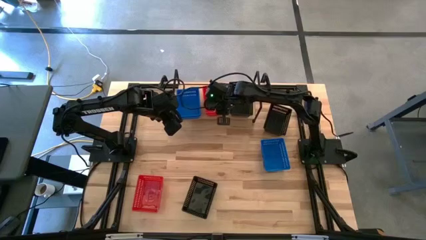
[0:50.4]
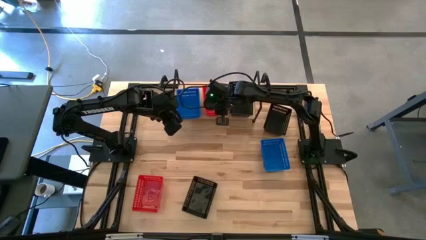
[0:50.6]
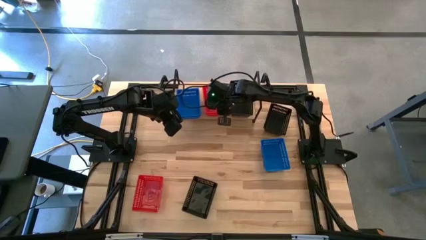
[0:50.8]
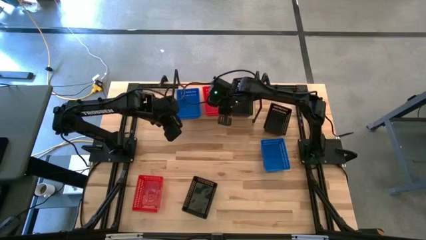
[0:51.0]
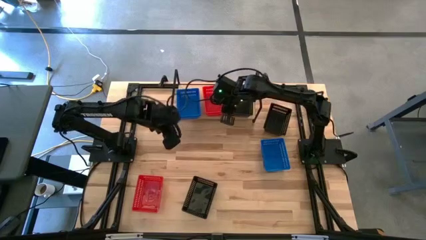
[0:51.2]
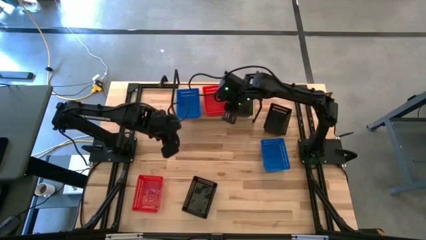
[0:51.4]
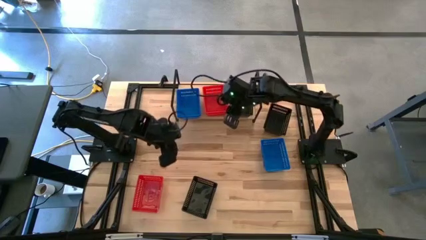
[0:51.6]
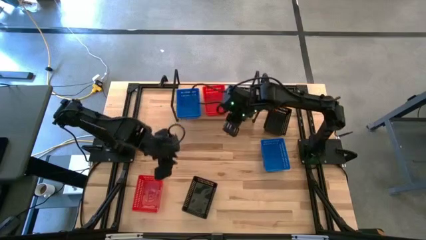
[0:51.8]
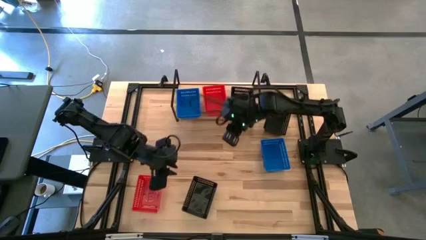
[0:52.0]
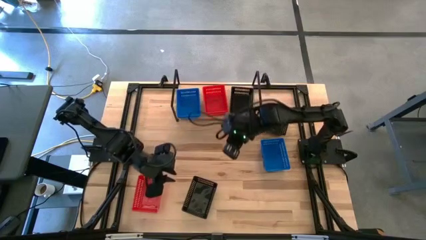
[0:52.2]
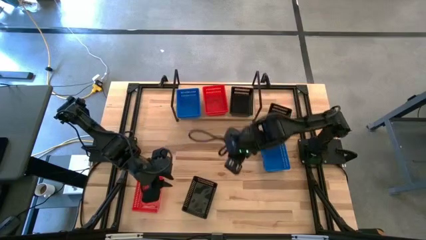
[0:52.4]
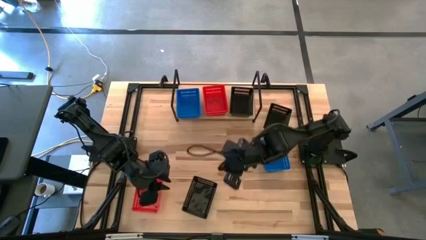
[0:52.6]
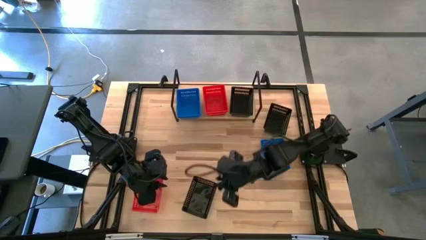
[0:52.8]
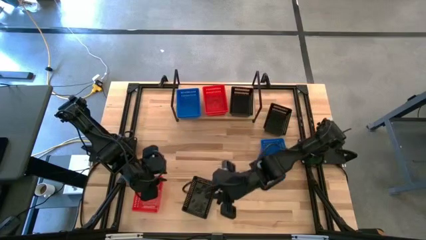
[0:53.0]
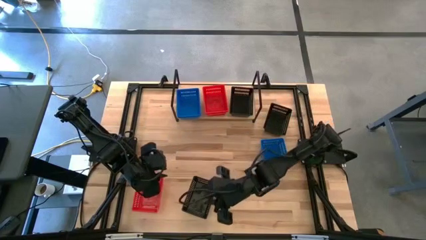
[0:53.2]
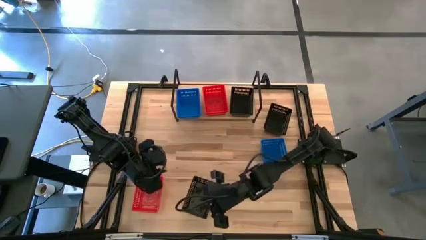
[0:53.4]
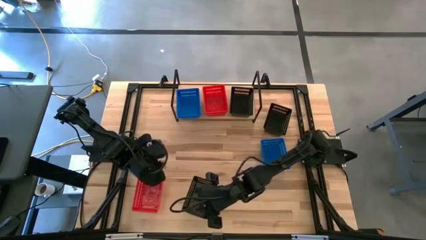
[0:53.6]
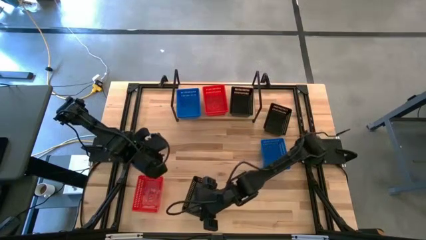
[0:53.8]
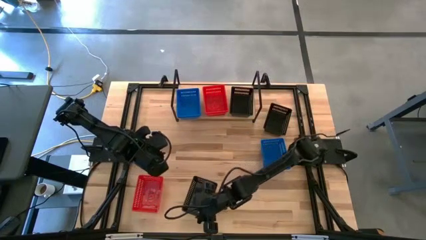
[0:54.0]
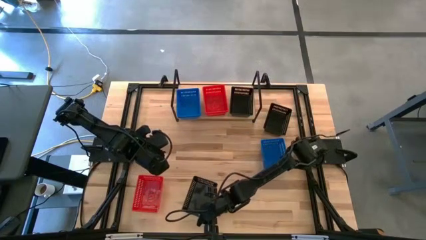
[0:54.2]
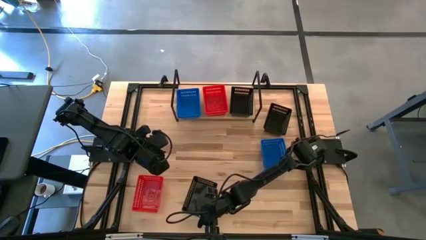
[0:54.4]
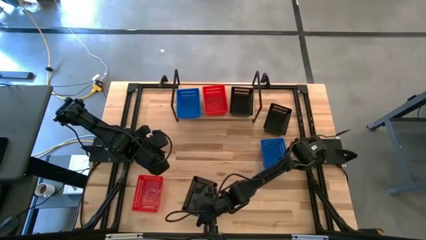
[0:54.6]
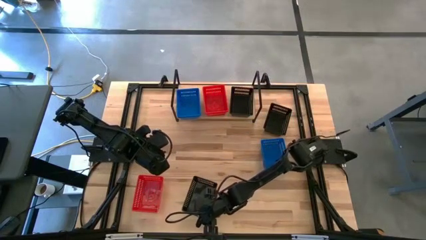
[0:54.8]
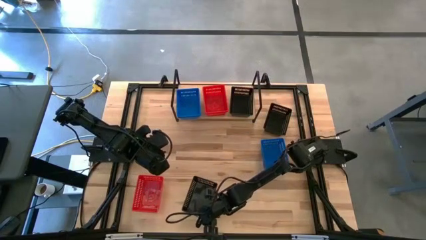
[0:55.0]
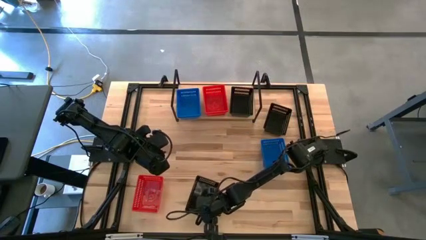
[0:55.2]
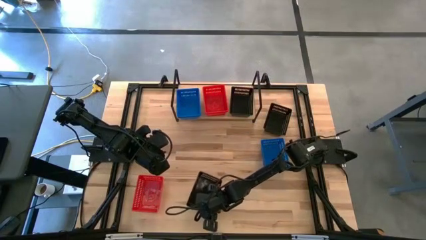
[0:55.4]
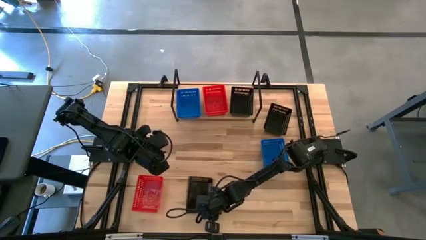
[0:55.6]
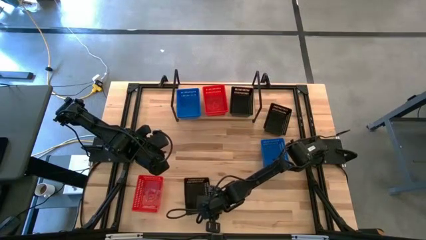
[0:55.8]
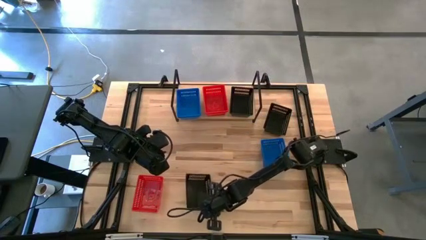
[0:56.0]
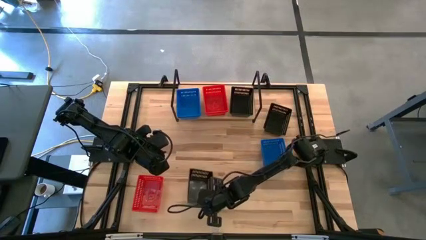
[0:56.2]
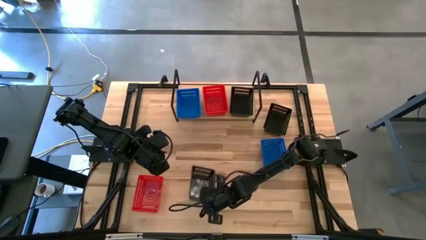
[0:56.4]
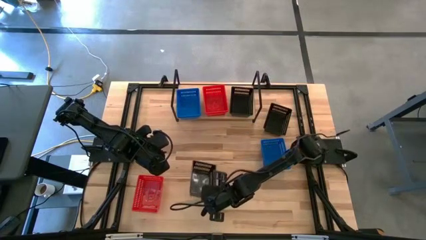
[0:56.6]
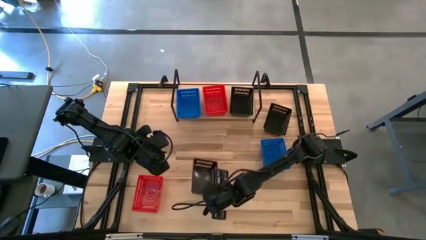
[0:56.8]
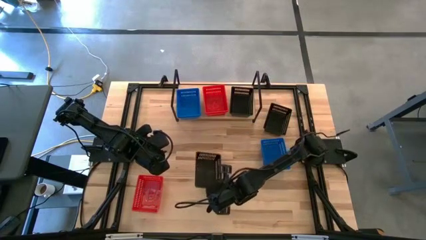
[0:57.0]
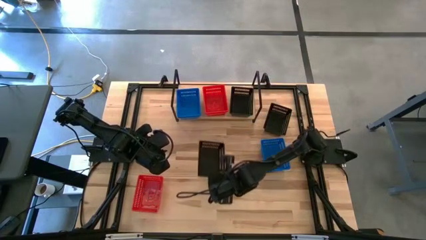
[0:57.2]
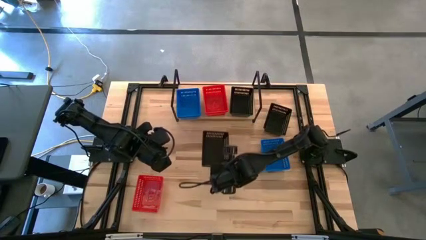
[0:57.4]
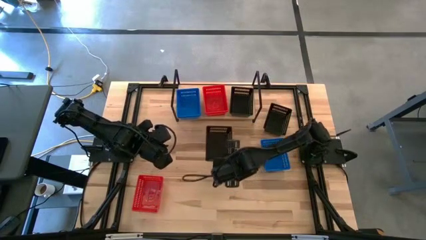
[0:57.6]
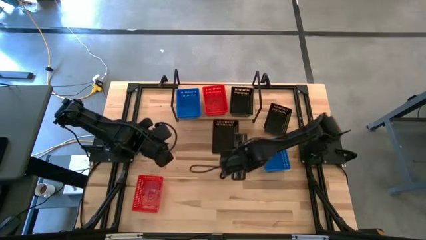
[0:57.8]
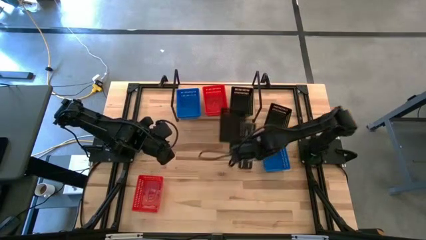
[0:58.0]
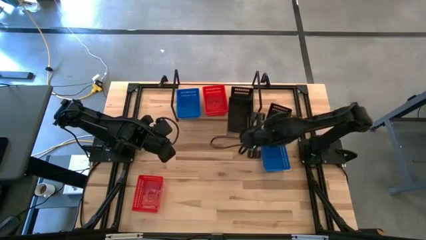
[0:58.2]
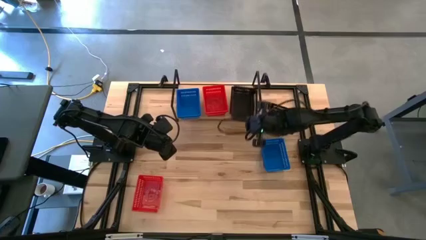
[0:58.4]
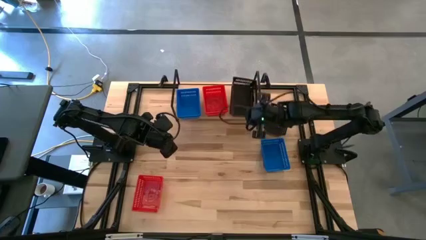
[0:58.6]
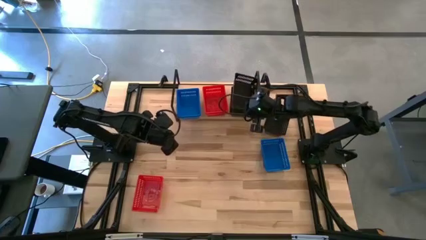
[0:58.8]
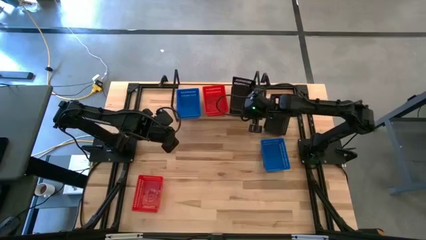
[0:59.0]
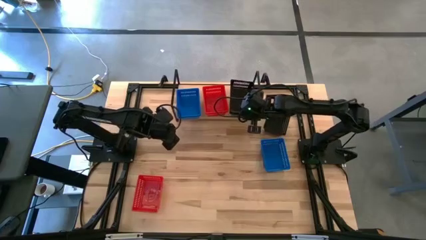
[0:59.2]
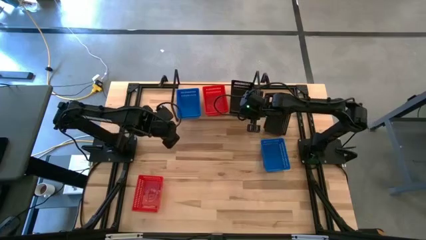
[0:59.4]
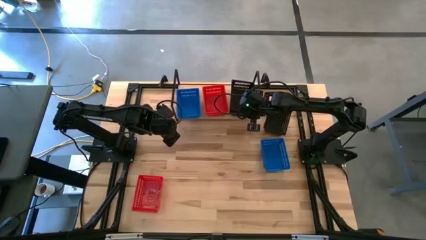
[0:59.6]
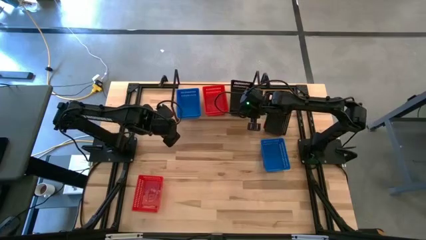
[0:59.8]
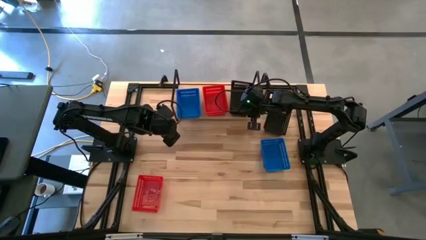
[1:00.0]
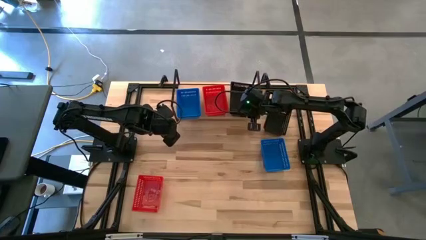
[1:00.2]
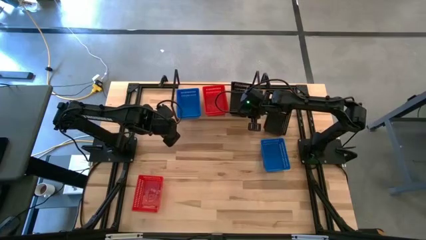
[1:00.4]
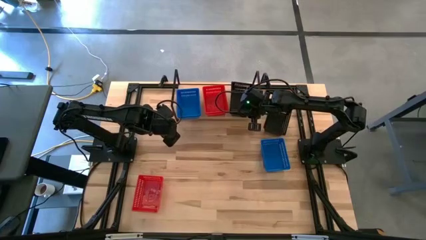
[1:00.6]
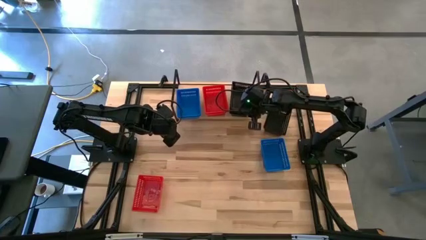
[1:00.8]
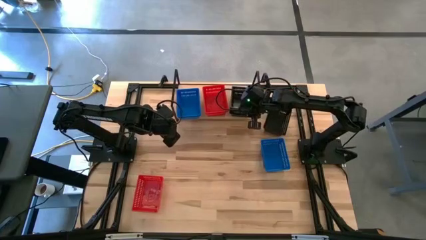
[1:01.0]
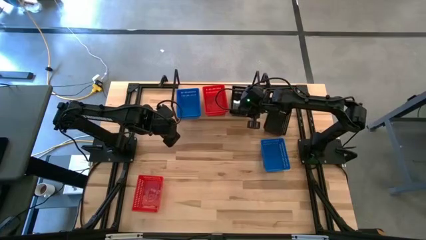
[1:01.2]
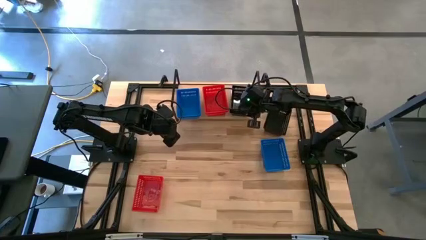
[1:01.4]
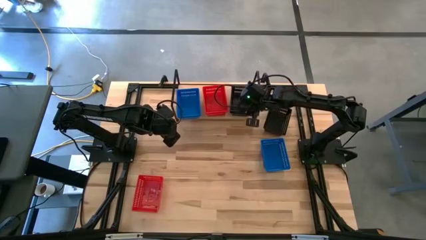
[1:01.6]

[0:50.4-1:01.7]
Task: Stack baskets on shelf by color
Stack the bottom black bin on top of the black bin on the shelf

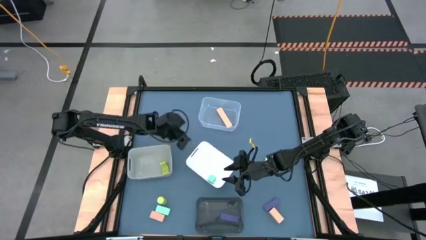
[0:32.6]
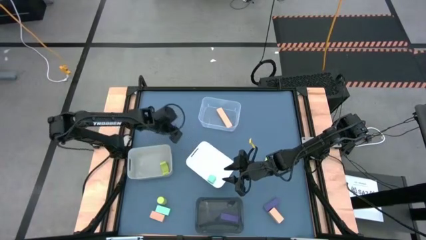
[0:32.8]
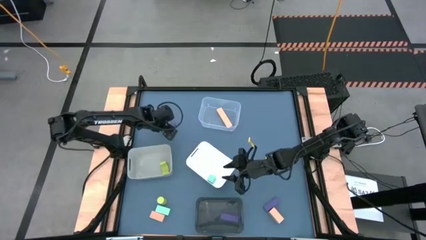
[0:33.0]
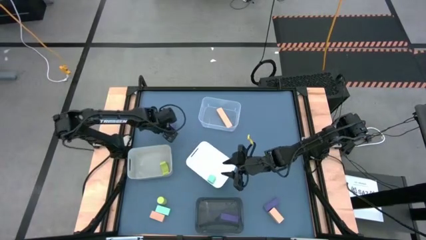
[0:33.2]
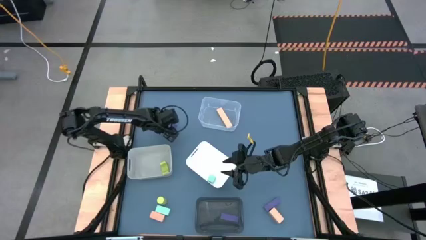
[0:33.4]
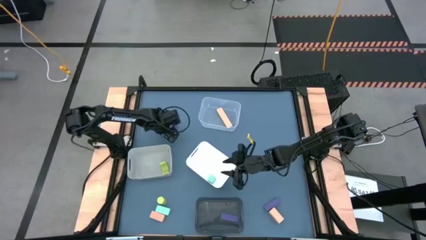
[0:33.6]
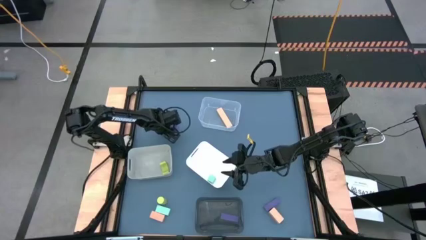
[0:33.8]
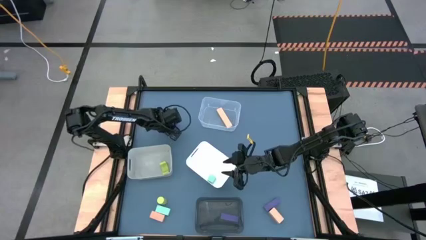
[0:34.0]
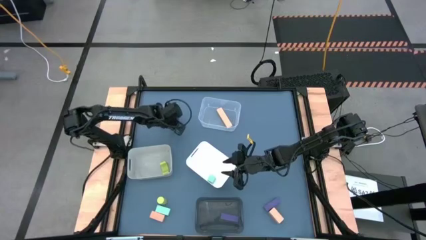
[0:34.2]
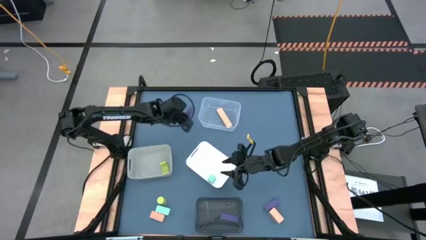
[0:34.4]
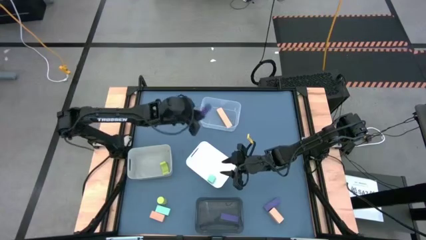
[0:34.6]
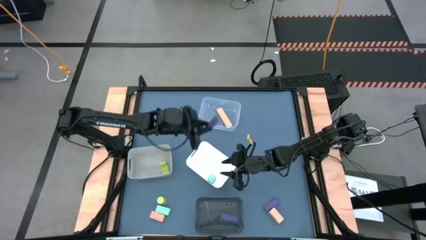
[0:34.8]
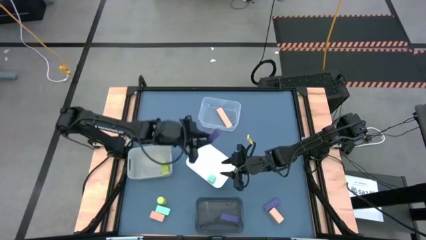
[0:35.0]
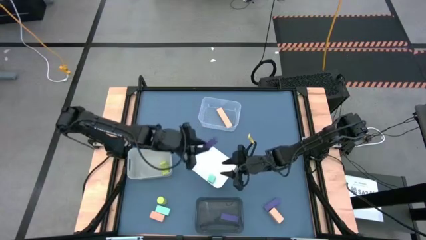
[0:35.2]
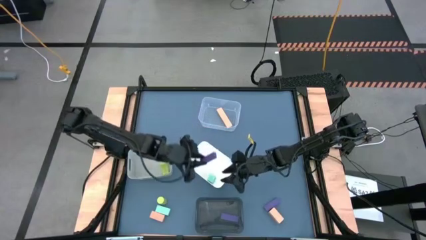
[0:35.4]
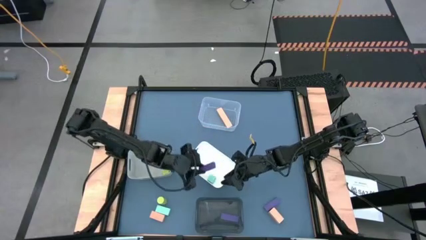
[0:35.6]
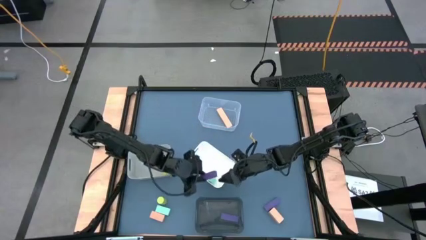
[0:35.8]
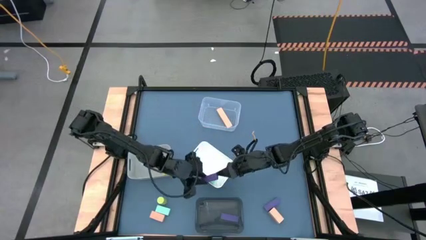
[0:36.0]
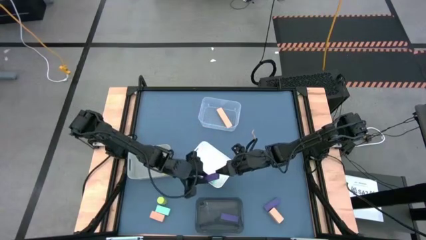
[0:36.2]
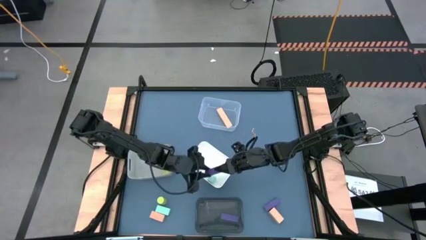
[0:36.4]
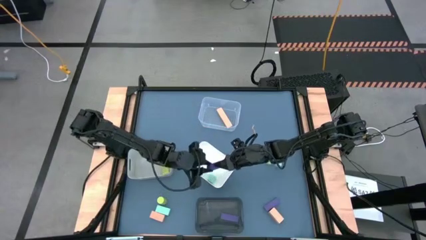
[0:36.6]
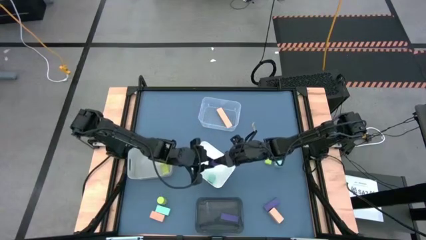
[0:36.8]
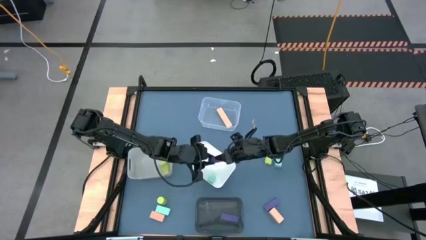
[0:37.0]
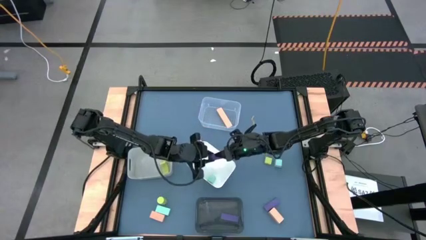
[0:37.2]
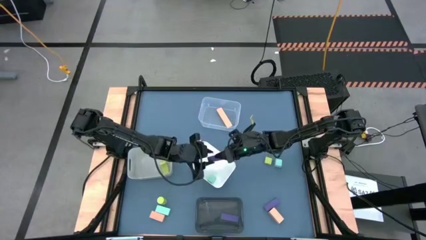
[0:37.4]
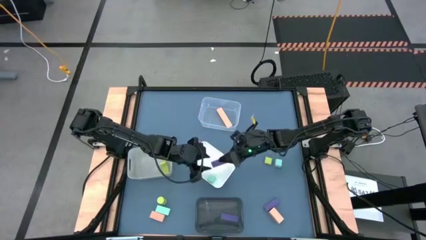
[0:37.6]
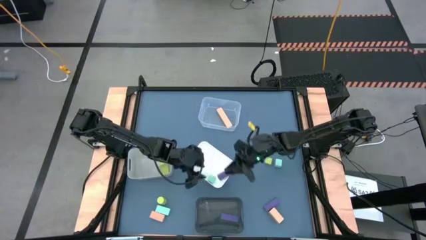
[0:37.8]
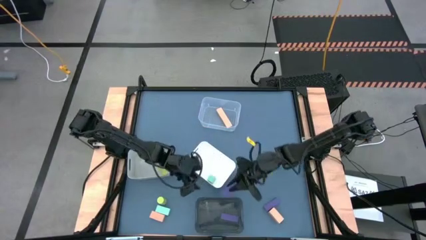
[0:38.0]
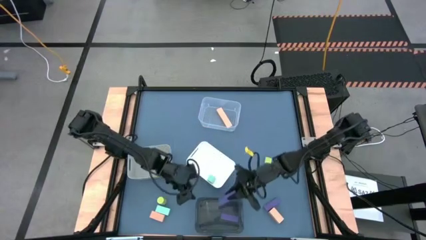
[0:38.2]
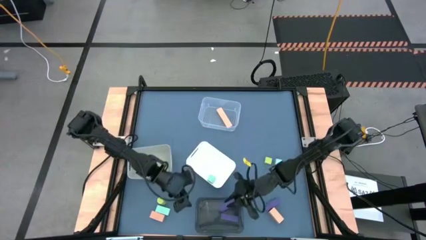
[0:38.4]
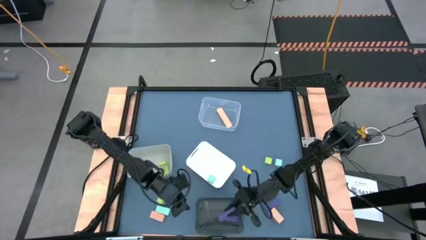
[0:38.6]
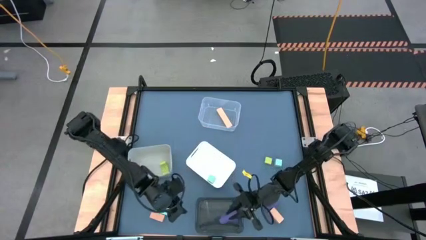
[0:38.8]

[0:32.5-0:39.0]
Task: Sort & place blocks by color
Put the top purple block into the black bin
